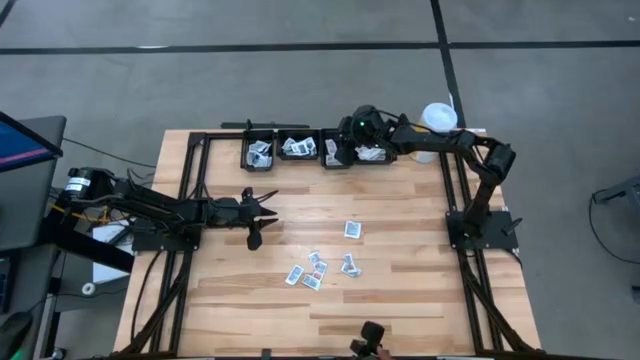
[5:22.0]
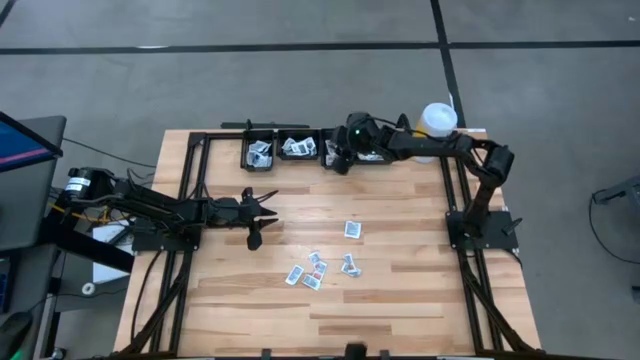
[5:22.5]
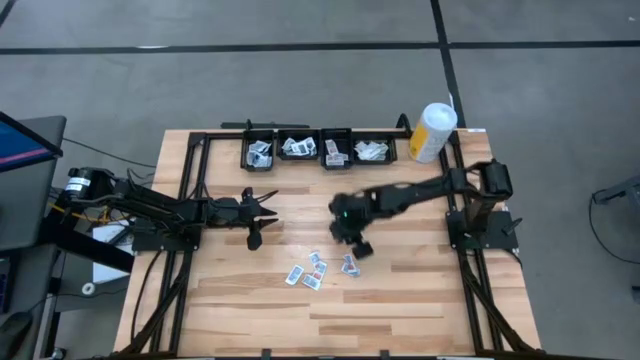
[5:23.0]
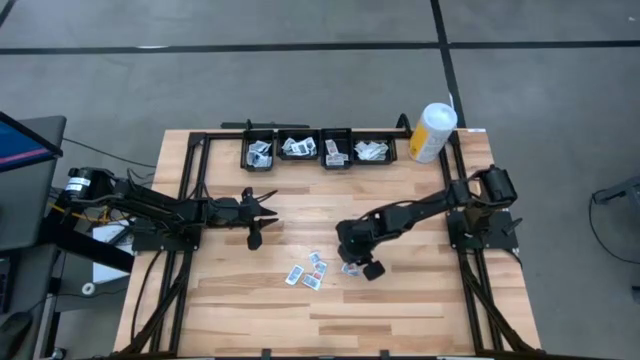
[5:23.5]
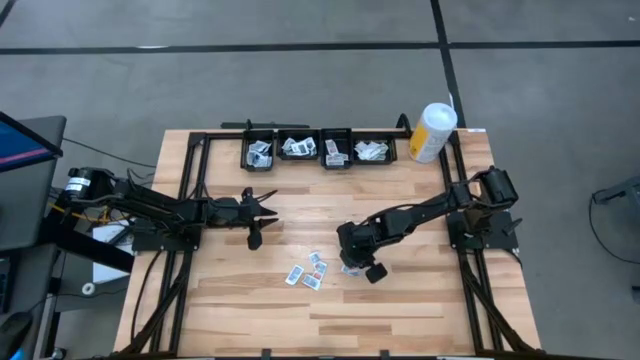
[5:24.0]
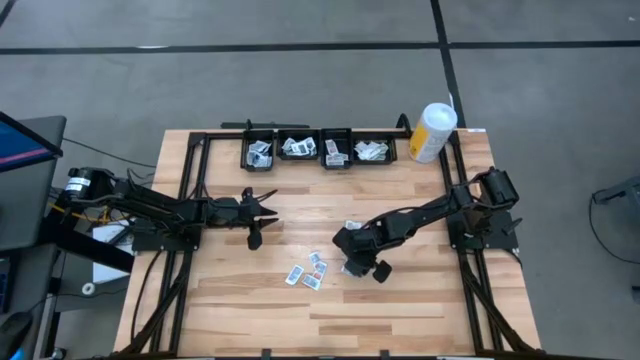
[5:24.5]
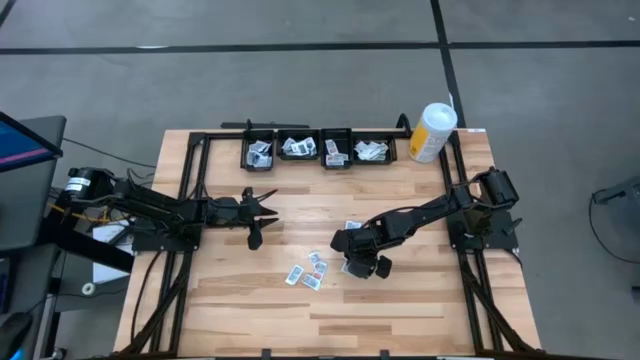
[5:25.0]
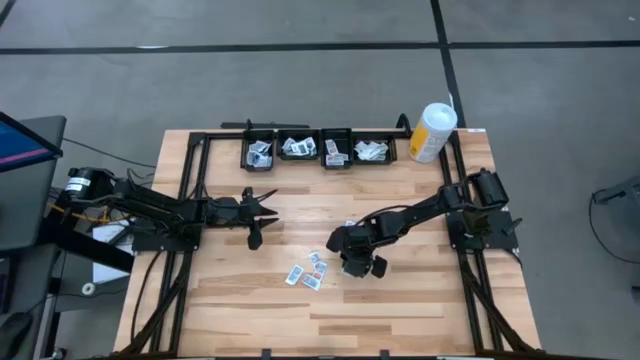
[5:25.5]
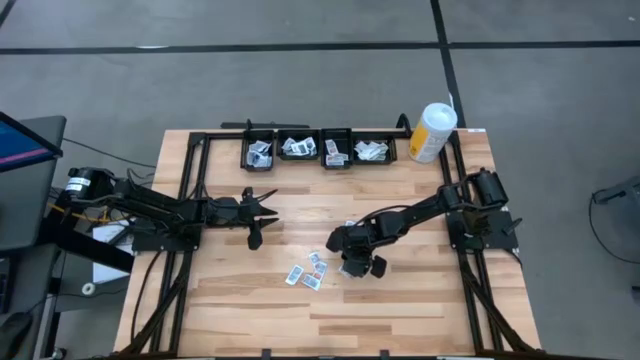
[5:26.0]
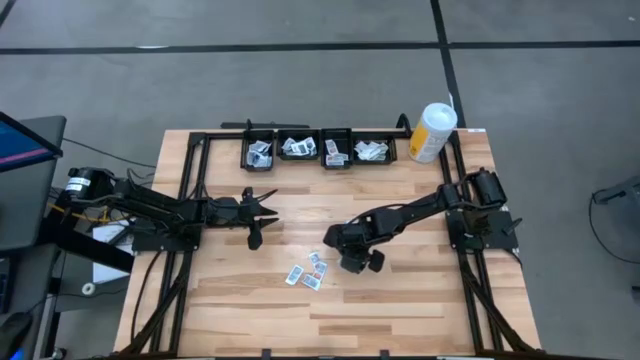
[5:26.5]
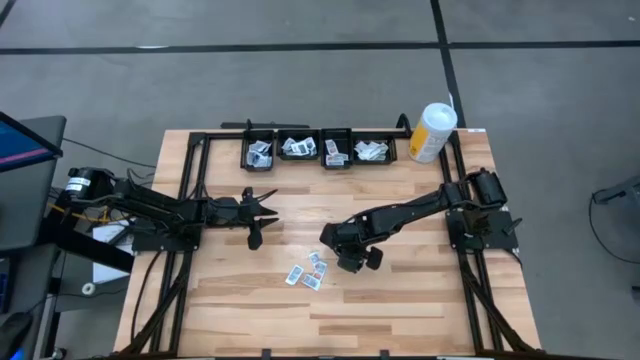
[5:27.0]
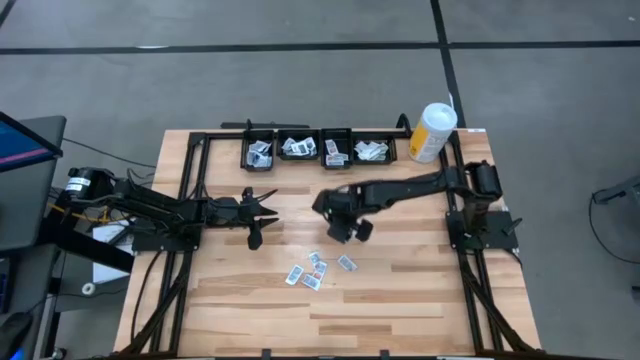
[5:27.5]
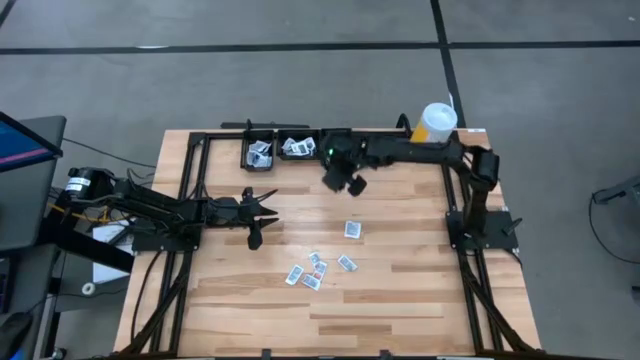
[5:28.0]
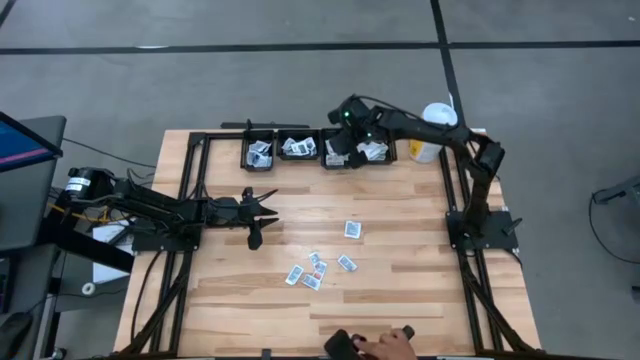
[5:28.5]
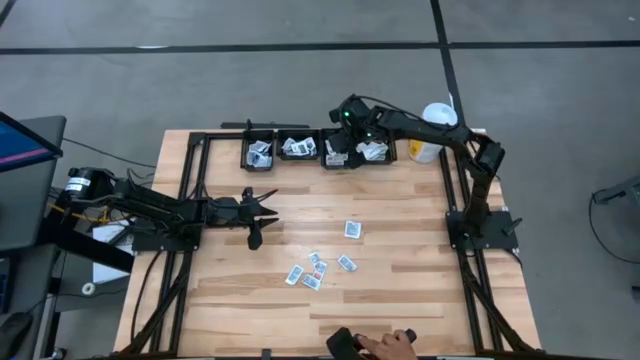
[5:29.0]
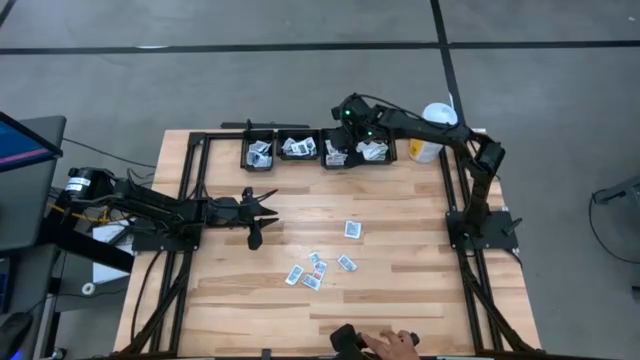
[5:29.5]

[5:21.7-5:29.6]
Task: Pick & Place First Aid Supplies
Put the orange ointment pack into the middle right black bin

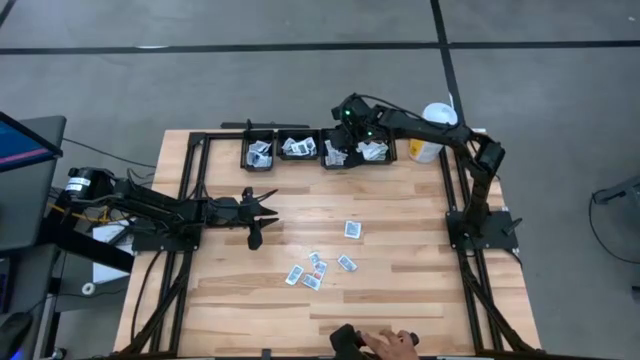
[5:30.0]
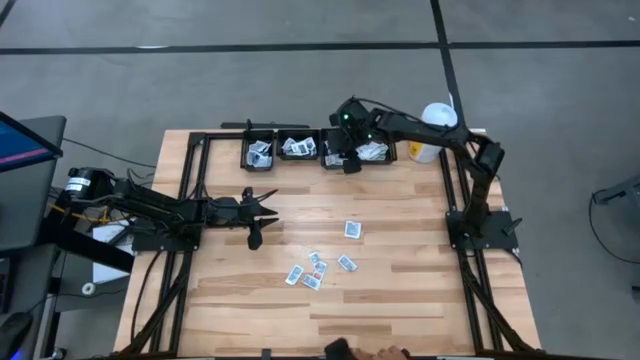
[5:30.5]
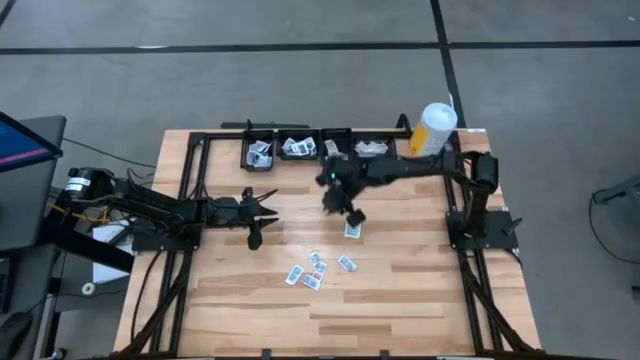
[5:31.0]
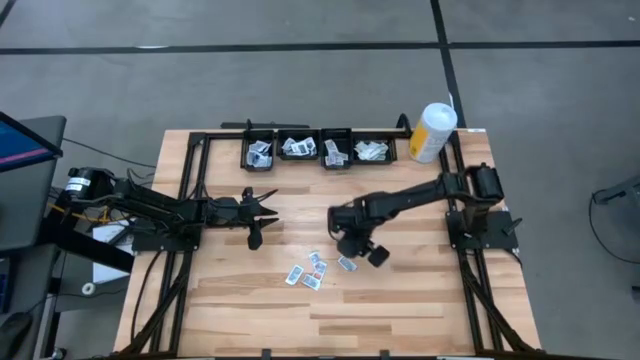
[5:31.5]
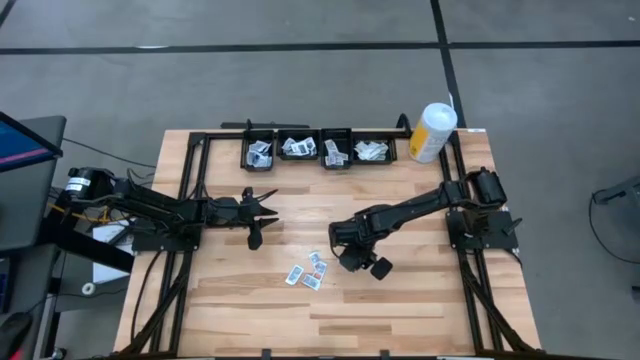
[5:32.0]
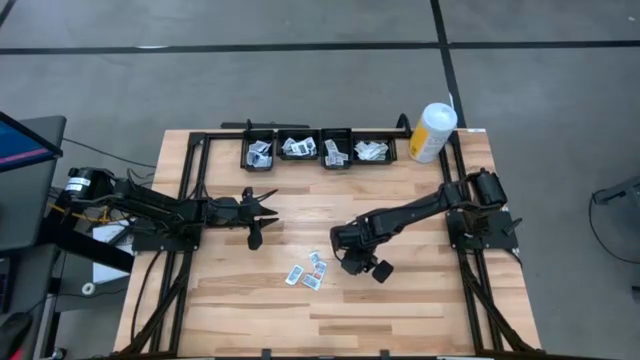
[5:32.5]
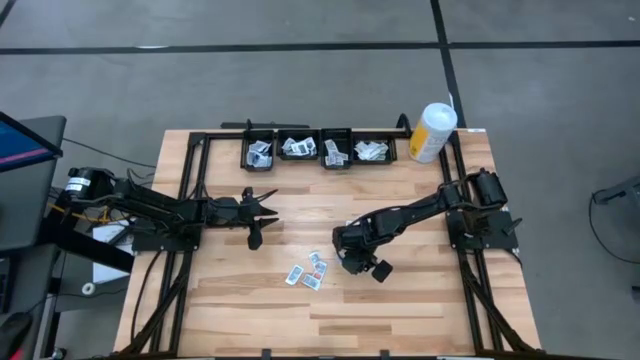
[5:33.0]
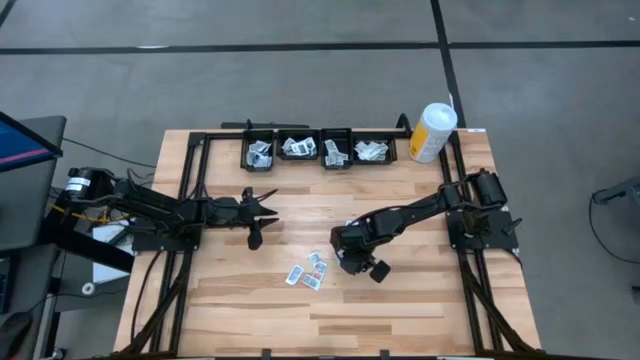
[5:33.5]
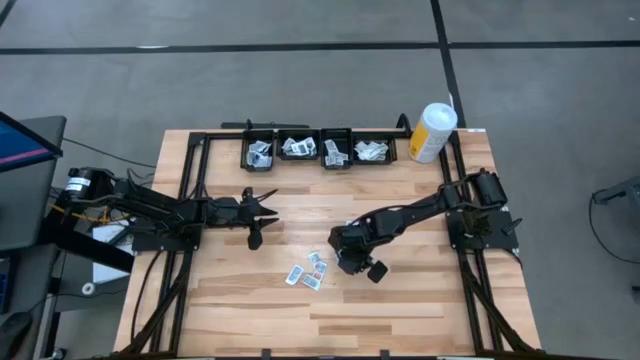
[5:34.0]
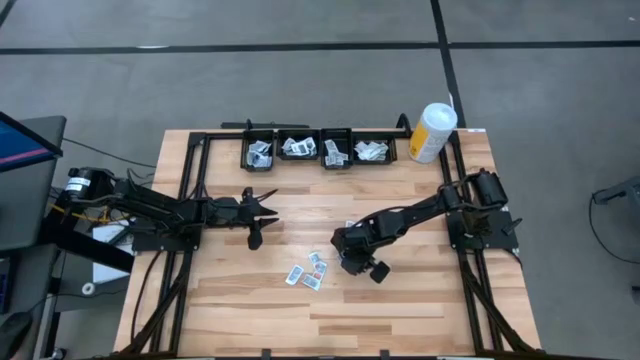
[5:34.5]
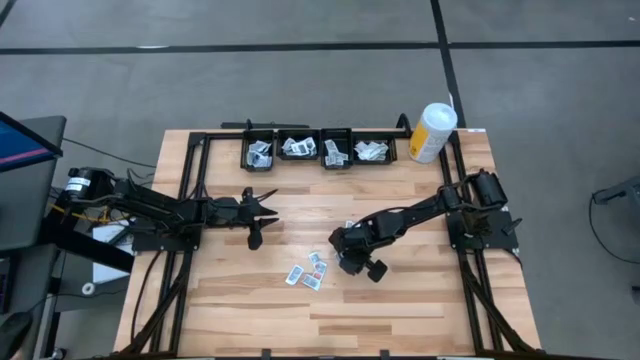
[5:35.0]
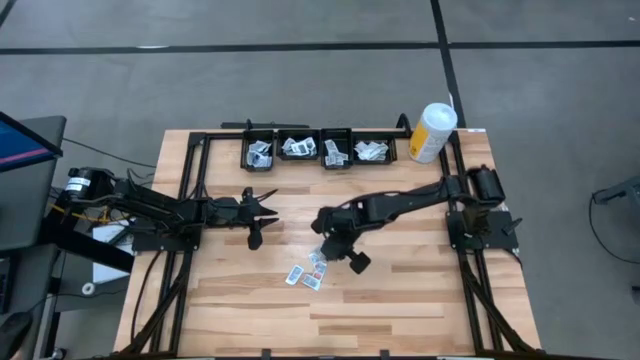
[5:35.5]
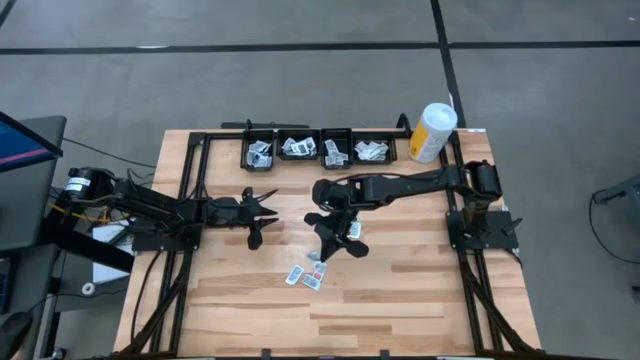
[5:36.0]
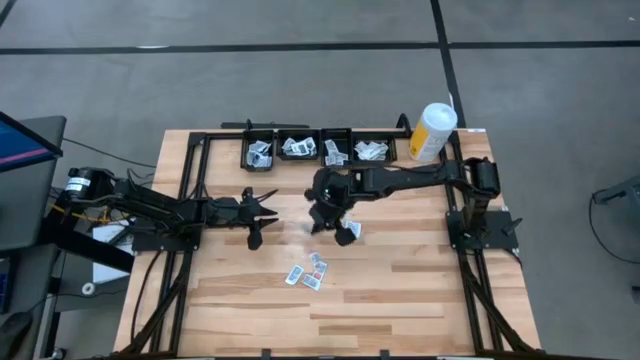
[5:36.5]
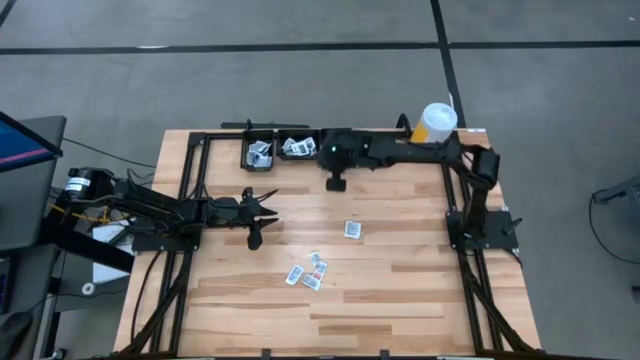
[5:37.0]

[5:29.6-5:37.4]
Put the orange ointment pack into the middle right black bin

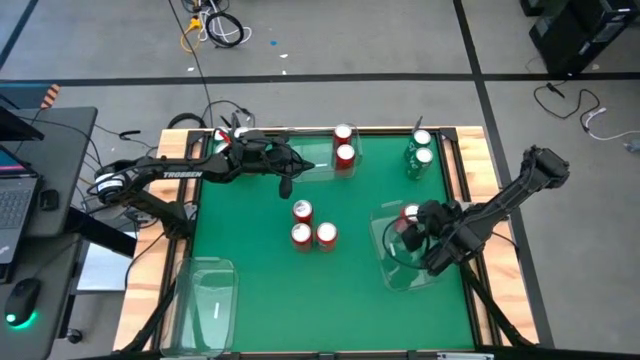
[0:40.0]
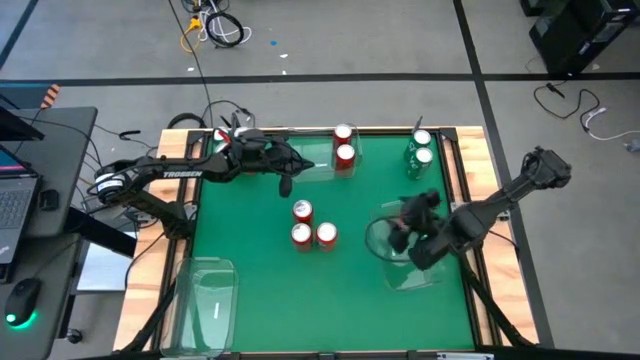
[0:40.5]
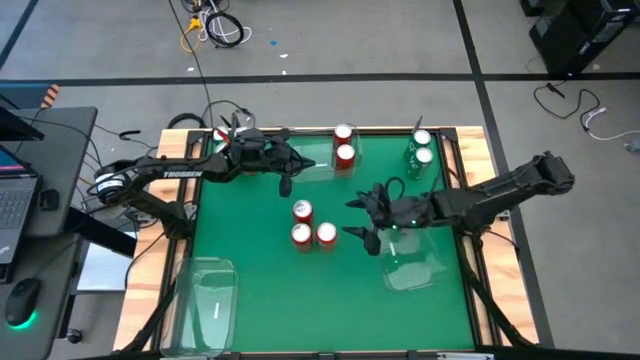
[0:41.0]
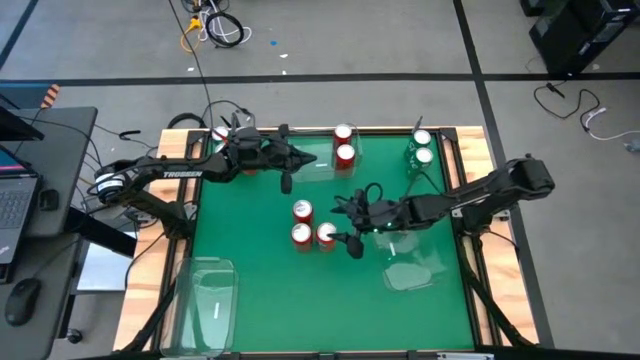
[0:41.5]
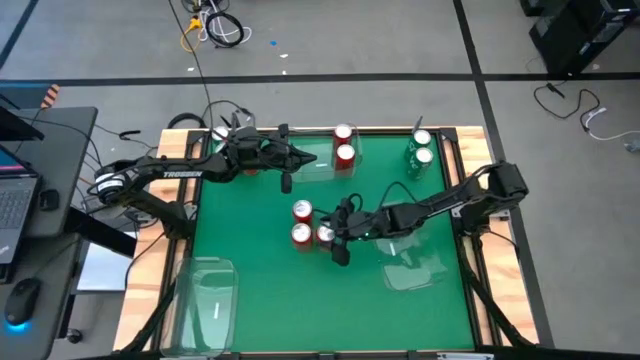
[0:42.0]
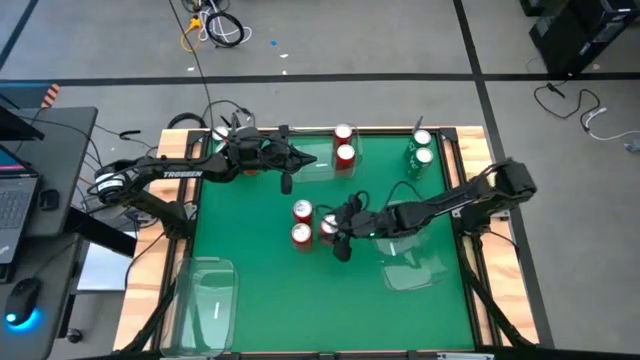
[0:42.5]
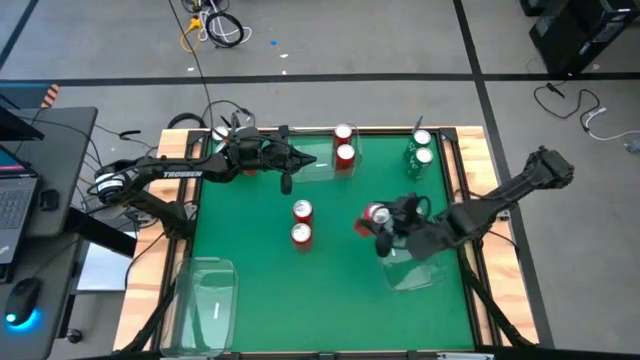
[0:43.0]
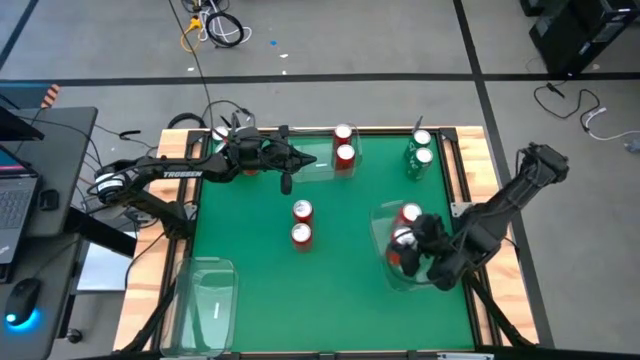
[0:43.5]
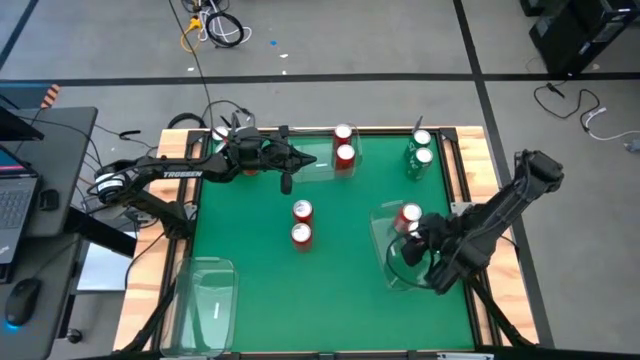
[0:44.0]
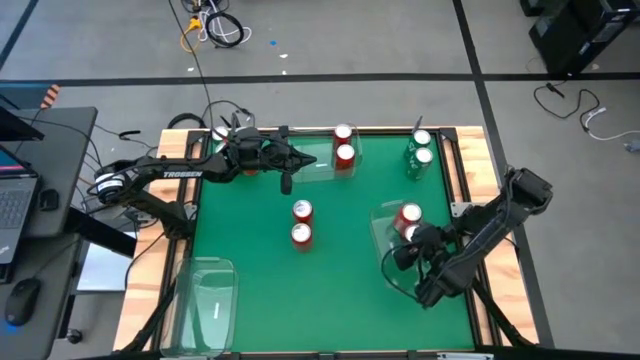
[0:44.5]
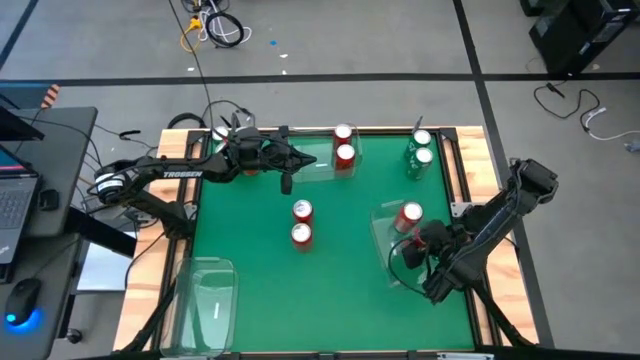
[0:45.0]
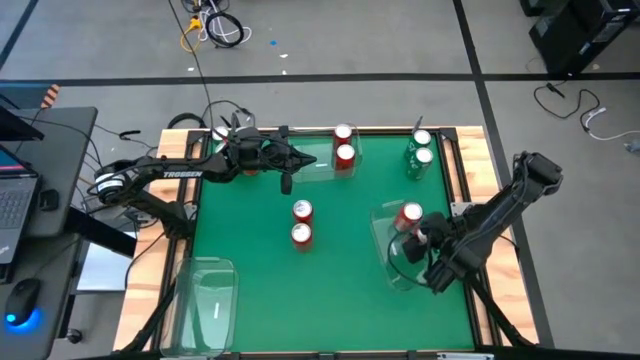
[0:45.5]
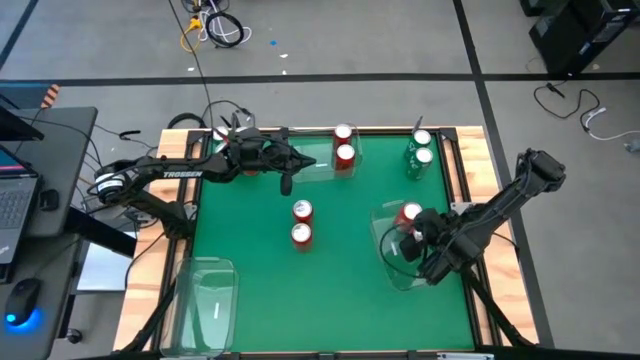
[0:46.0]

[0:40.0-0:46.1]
Task: Sort soda cans
Put the red soda can into the middle right transparent bin
